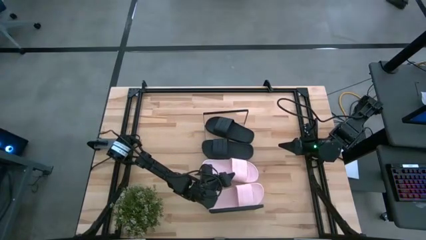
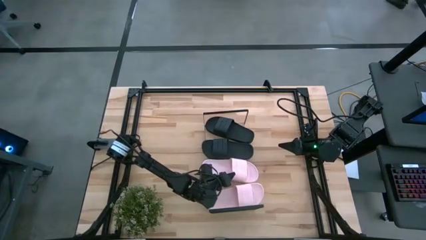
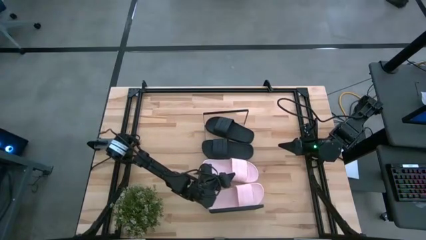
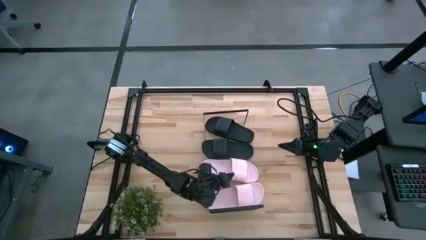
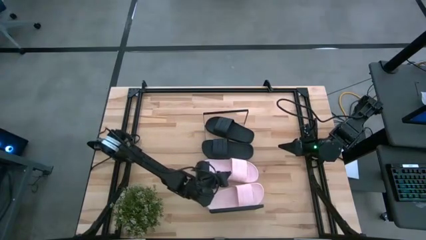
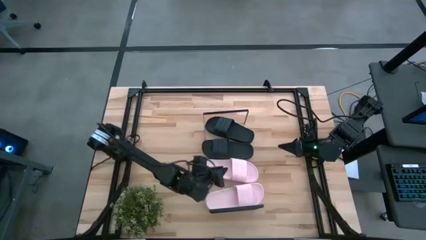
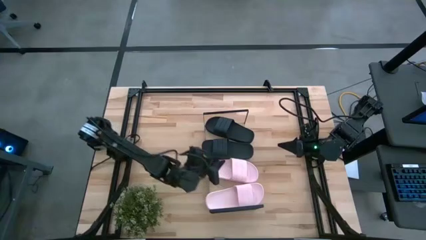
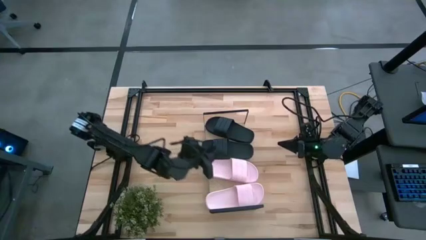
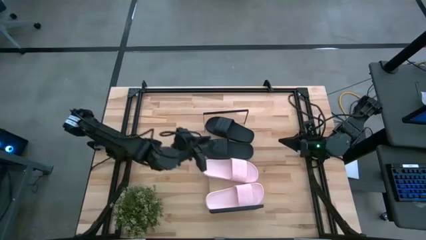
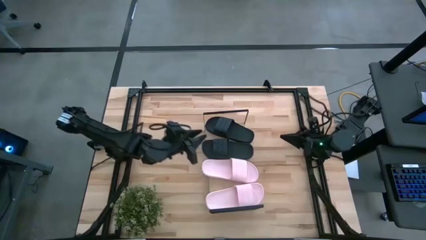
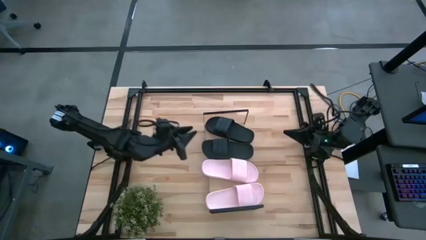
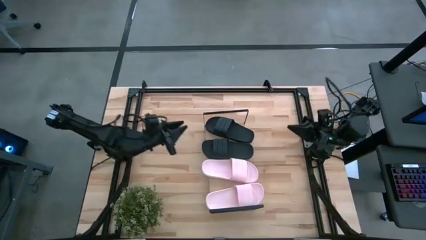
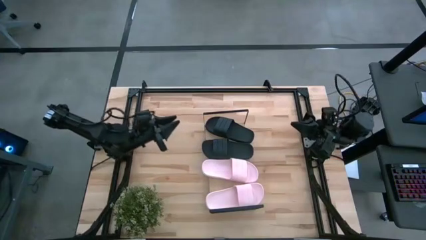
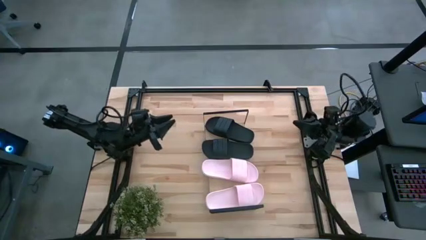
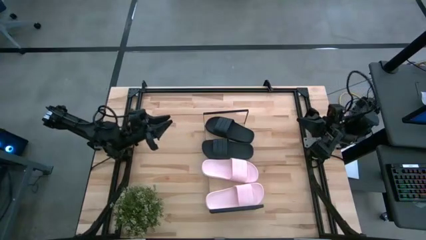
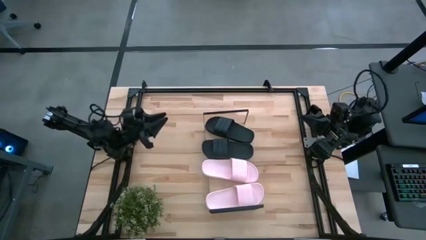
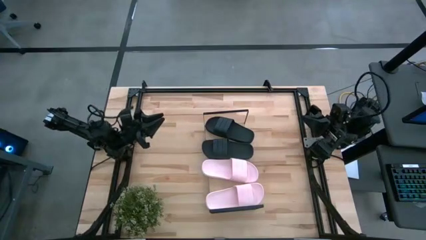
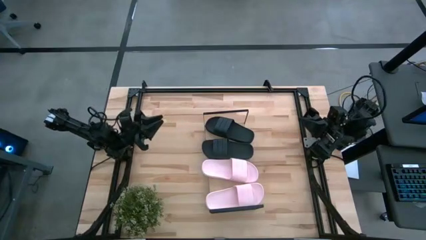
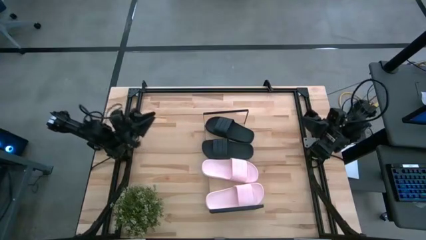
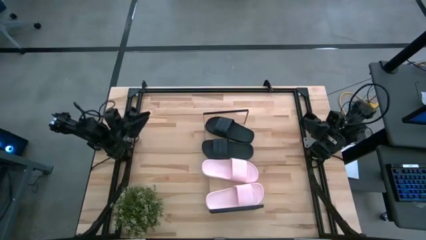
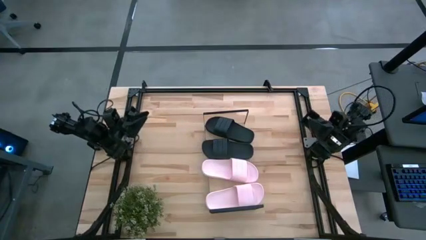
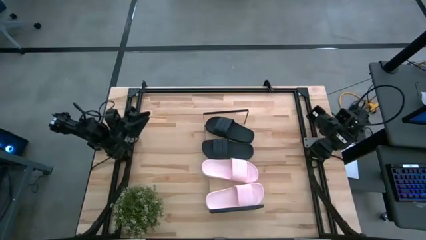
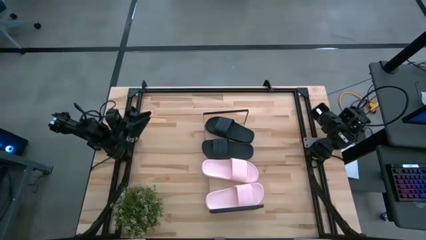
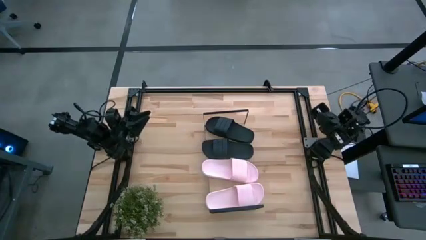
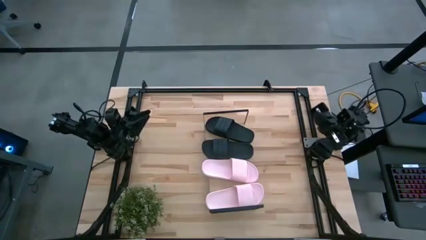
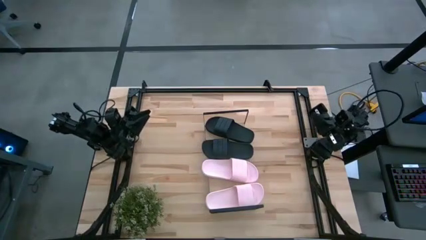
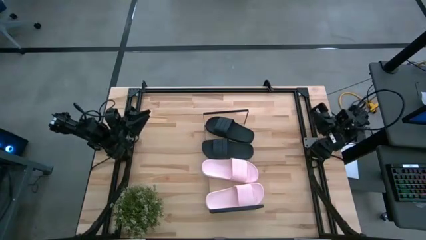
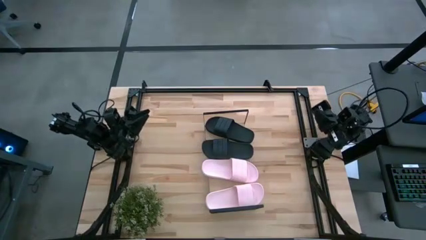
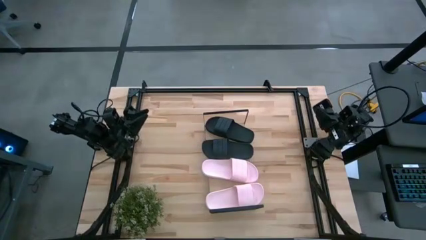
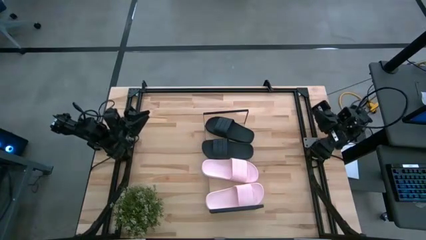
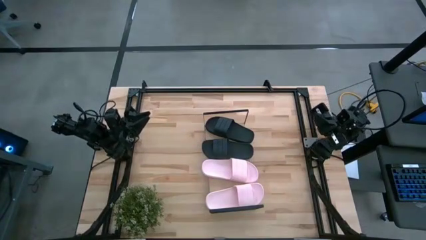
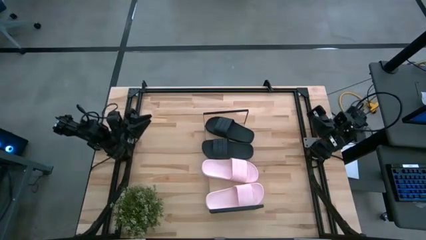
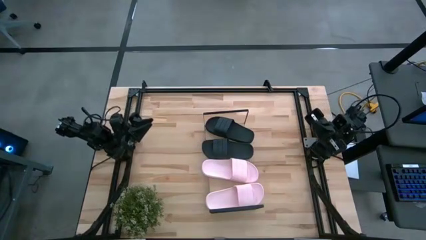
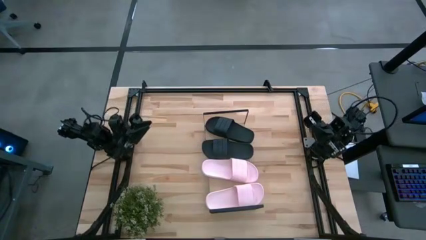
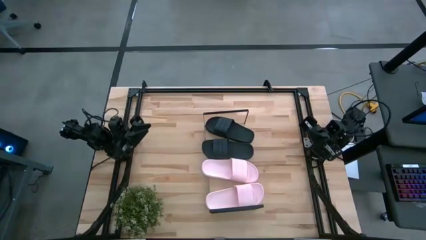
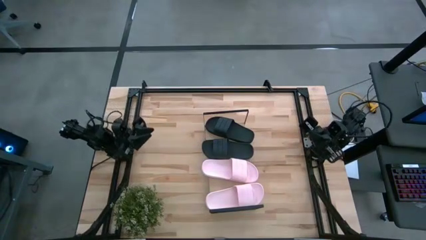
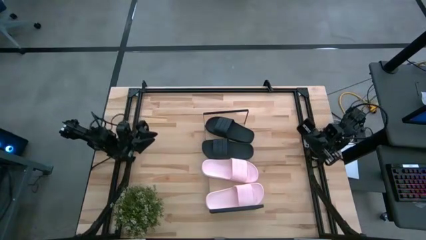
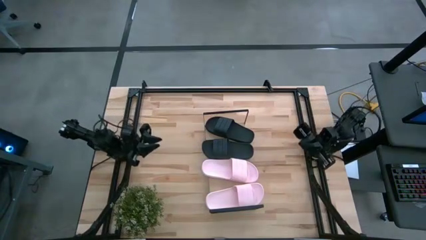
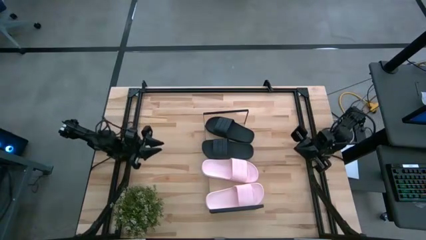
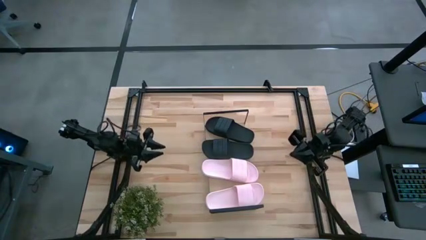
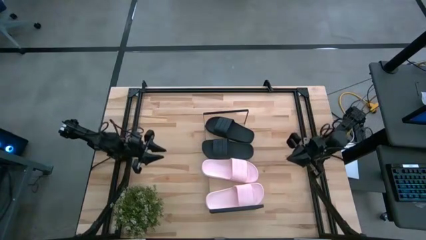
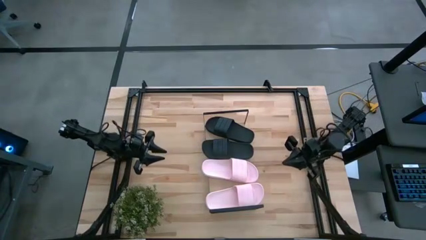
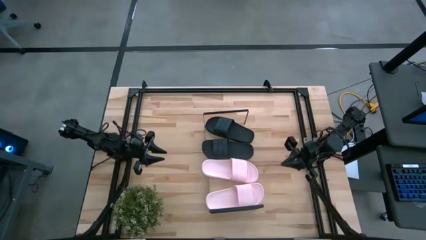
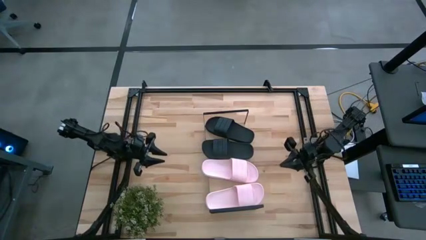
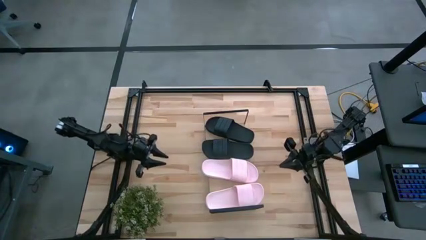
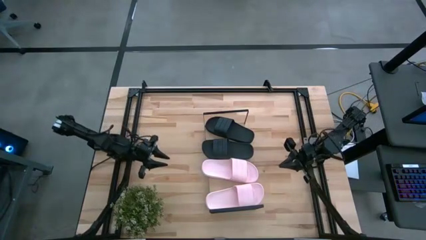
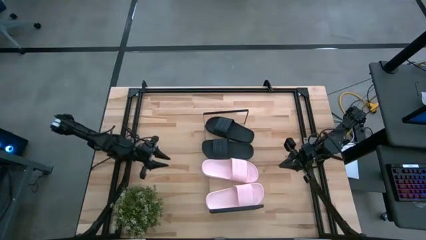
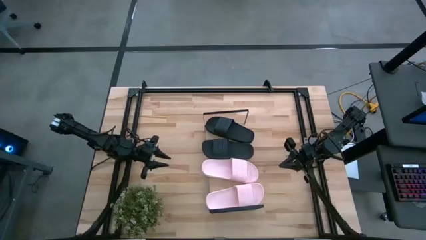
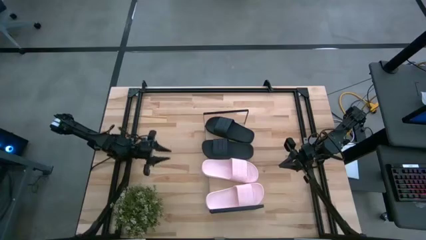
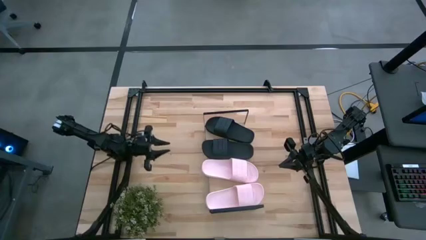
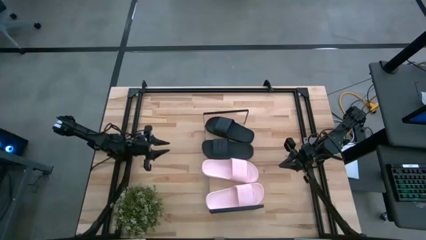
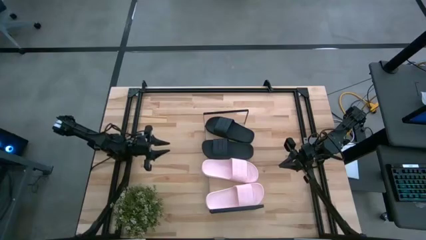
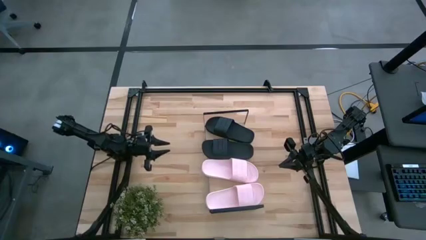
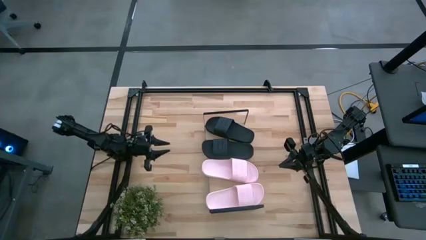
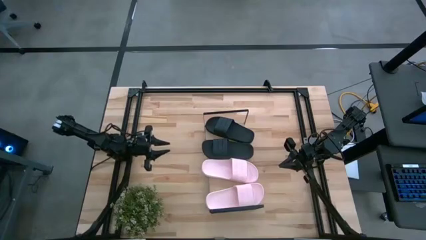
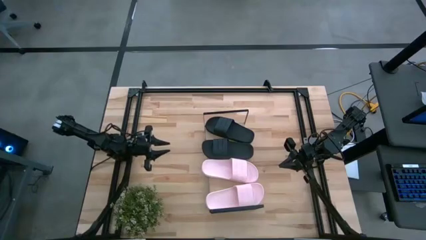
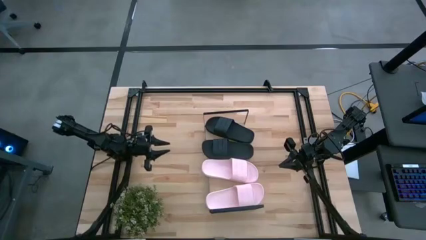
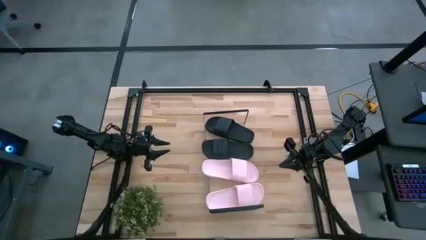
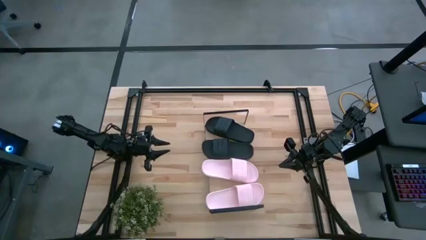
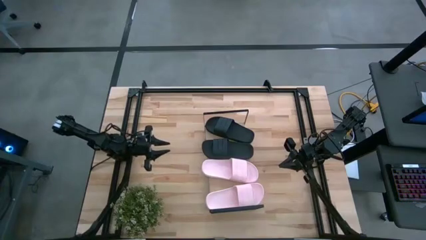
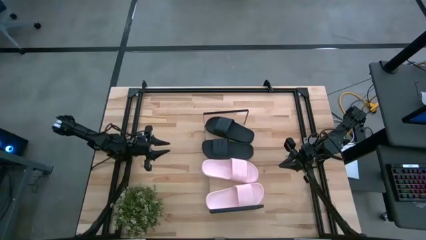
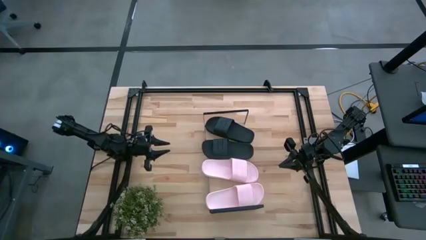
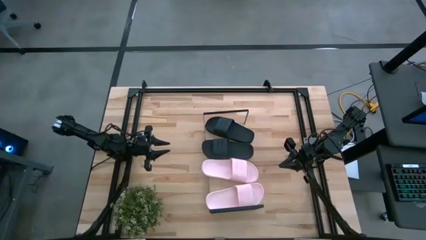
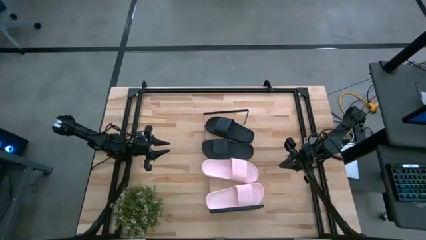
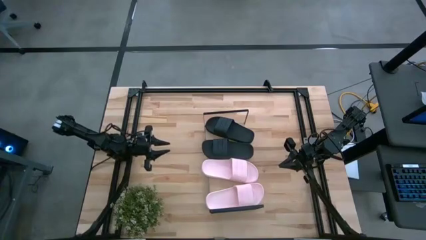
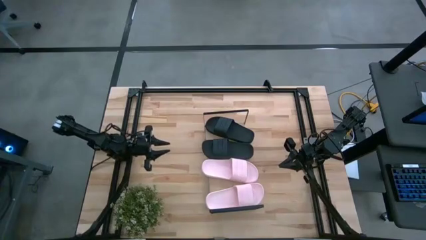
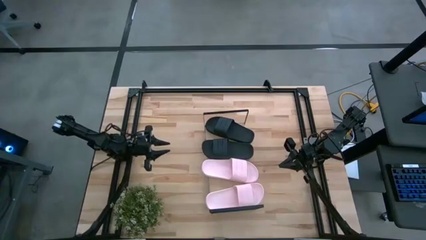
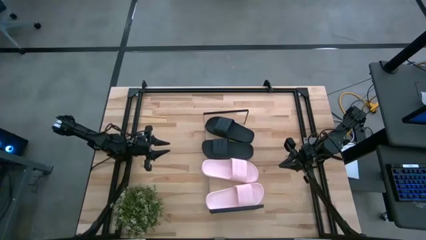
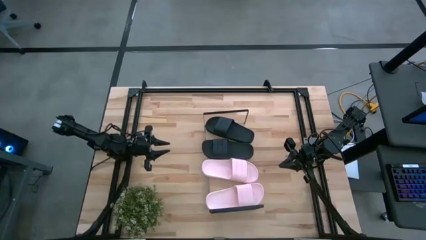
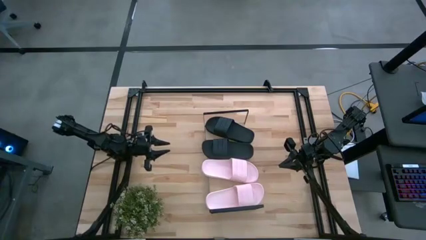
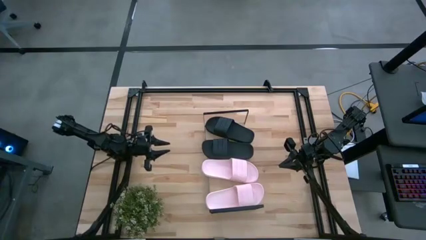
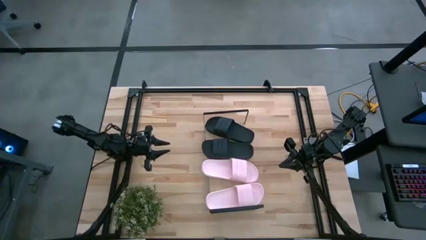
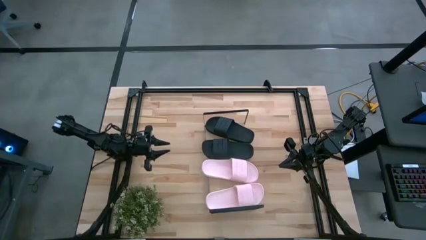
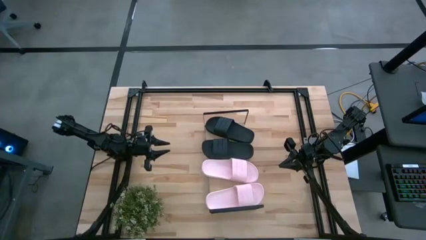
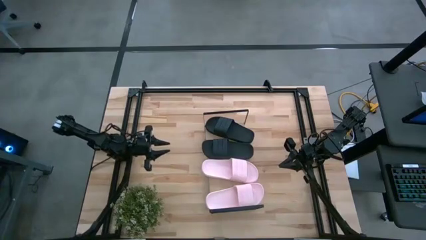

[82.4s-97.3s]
Task: Pick and place slides into the shelf
Return to Home Position
